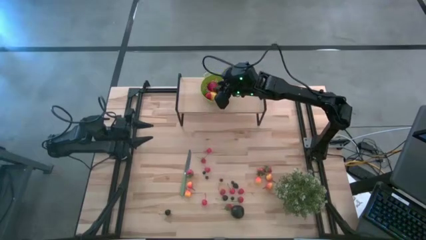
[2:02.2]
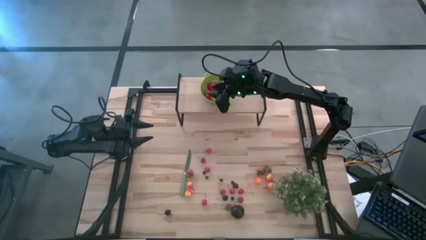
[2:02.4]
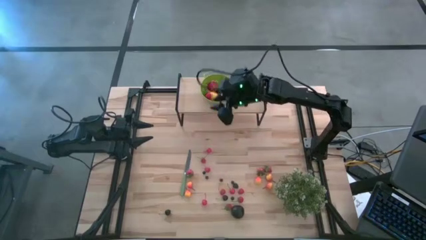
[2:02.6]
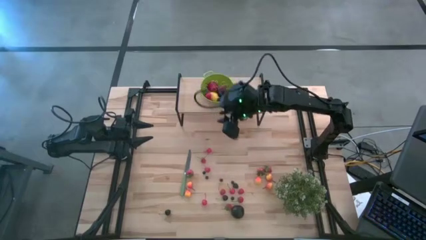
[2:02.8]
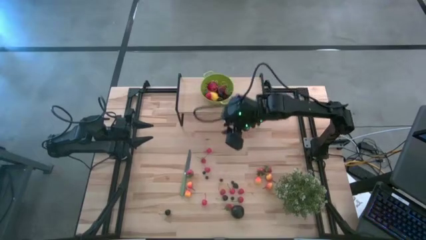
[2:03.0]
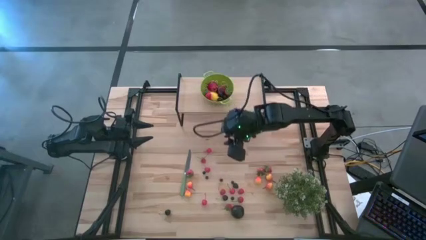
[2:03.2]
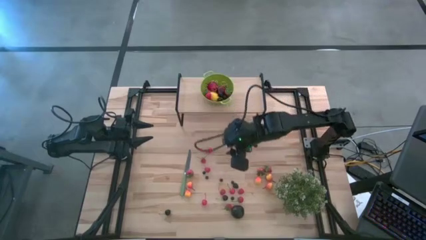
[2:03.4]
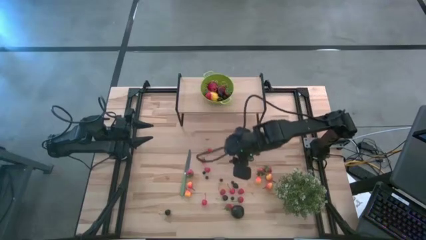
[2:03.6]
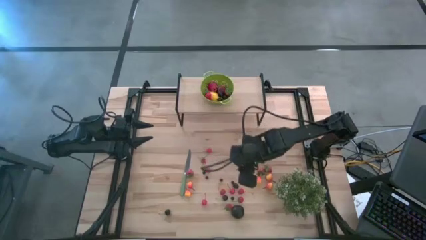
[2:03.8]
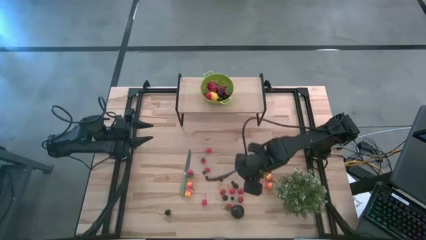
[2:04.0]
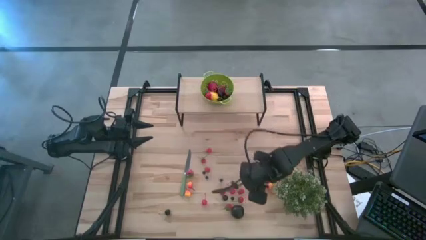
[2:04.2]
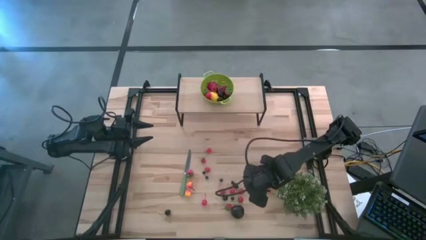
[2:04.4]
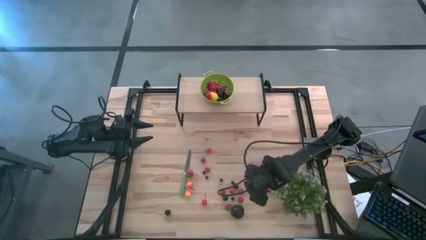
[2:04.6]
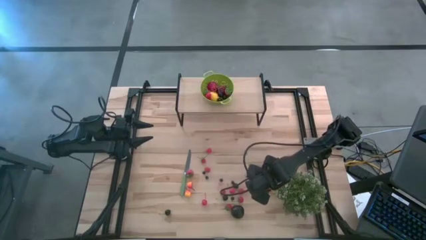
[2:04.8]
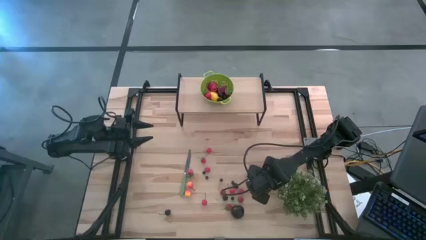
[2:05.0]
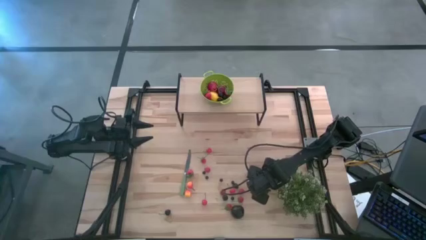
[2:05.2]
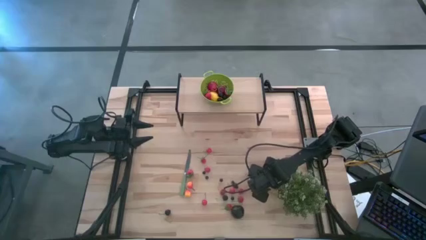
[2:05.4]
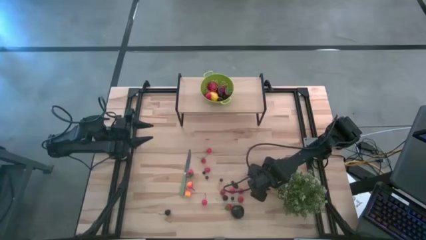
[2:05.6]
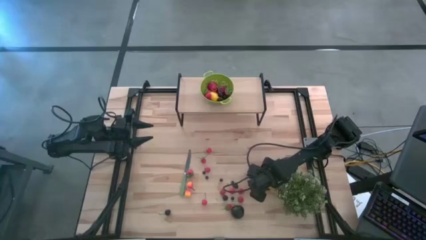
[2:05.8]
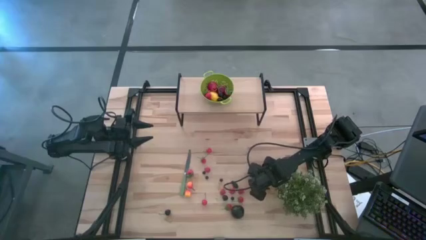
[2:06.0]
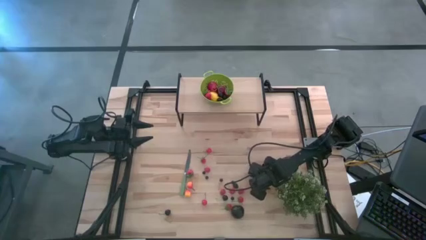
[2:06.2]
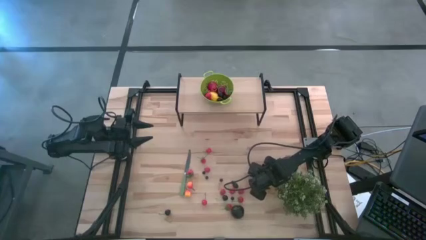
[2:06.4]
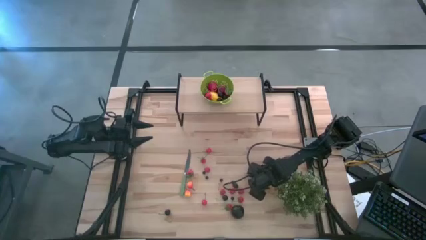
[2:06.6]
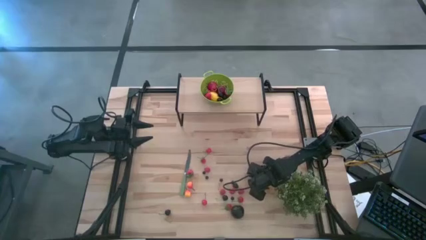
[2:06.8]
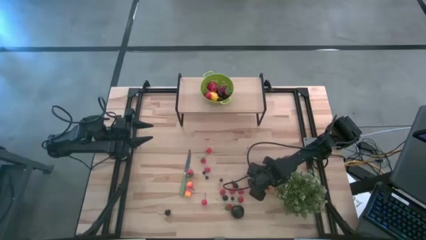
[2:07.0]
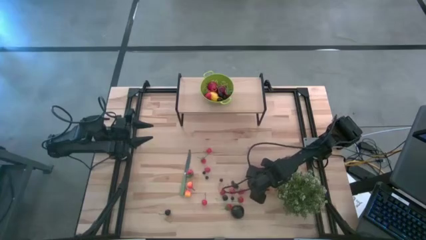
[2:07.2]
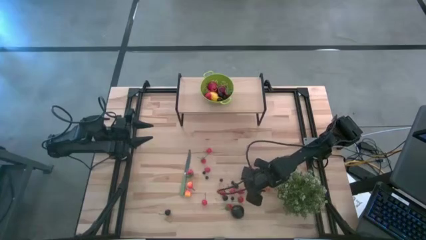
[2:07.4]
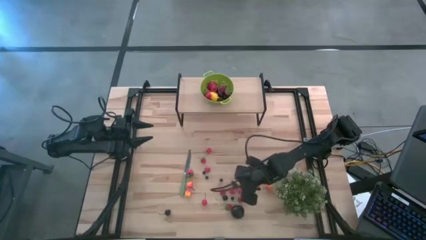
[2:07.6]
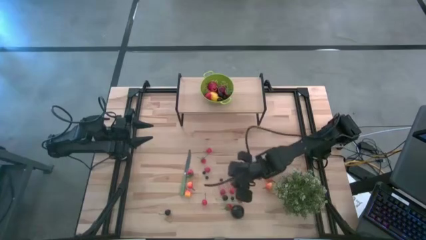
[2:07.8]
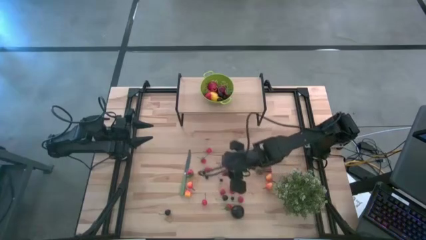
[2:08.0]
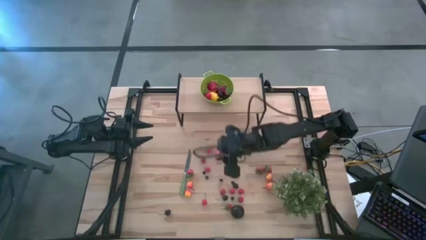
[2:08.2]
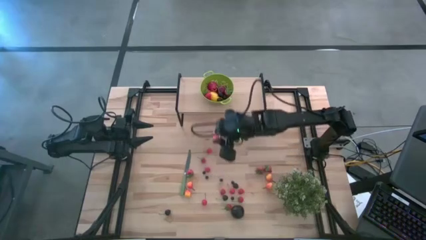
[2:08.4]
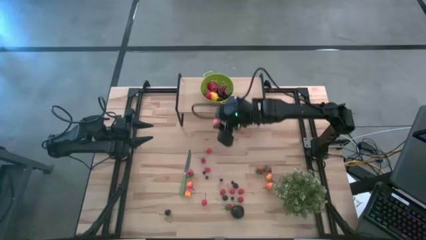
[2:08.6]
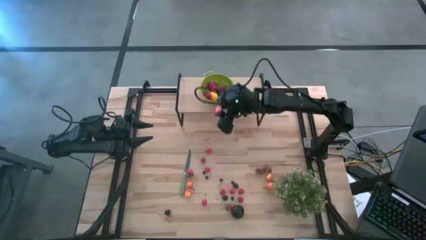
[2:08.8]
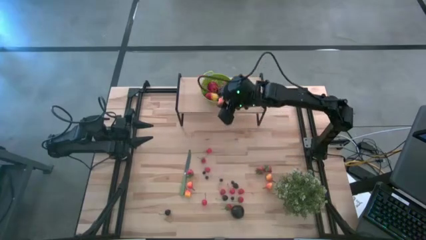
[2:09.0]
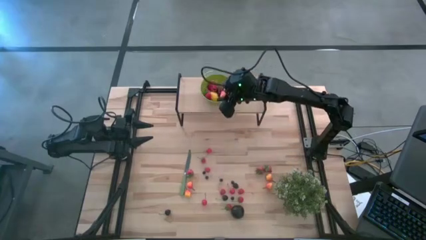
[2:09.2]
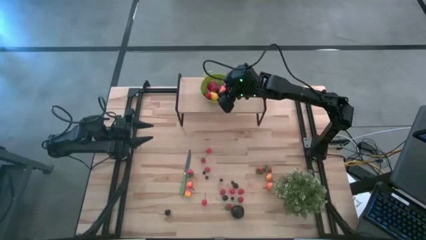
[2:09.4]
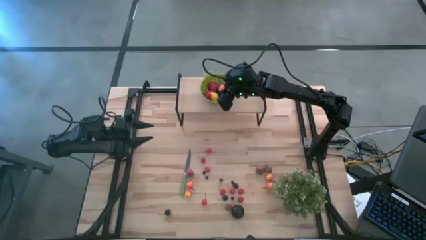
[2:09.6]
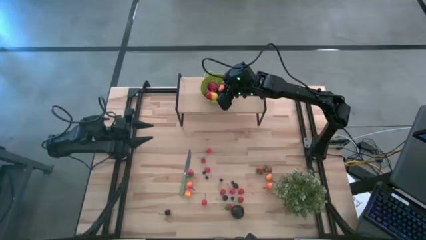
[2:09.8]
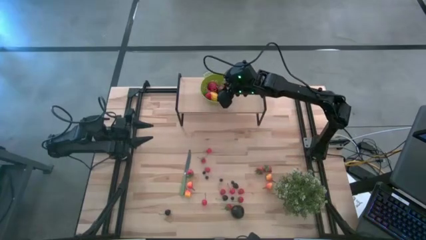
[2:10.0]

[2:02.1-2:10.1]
Task: Pick & Place Fruit
Put the pear into the green colander on the shelf

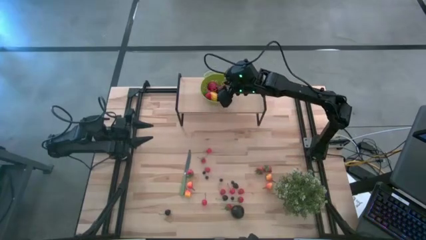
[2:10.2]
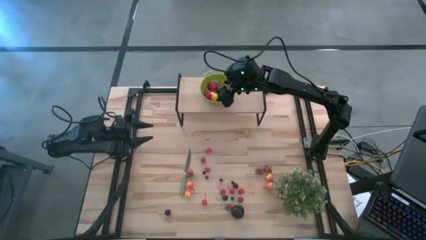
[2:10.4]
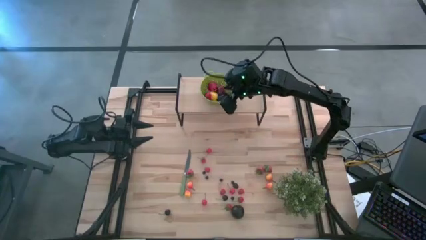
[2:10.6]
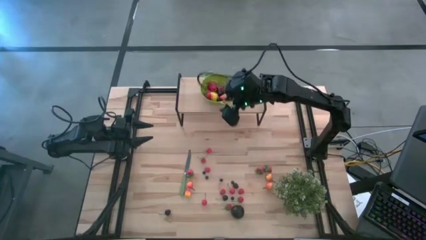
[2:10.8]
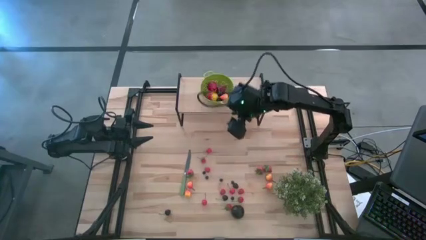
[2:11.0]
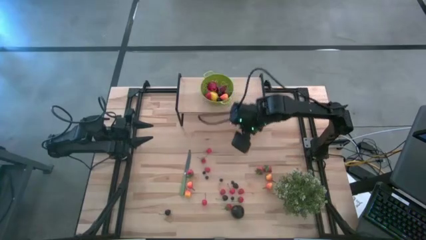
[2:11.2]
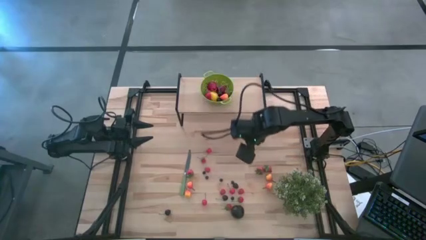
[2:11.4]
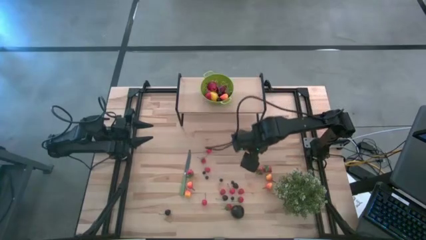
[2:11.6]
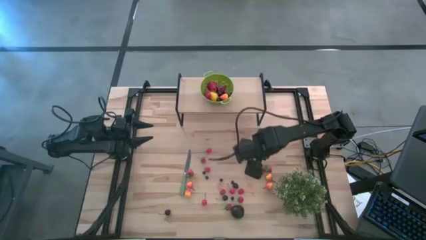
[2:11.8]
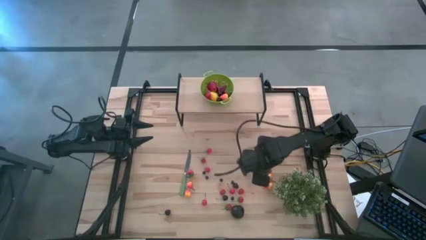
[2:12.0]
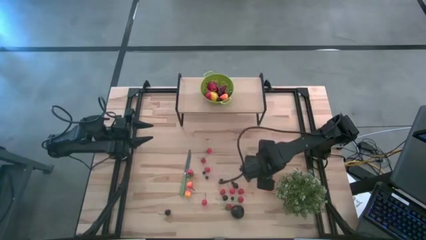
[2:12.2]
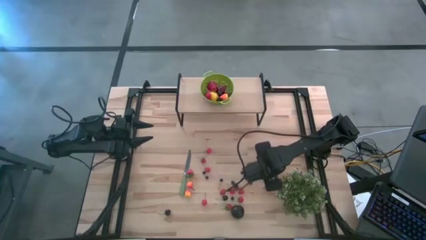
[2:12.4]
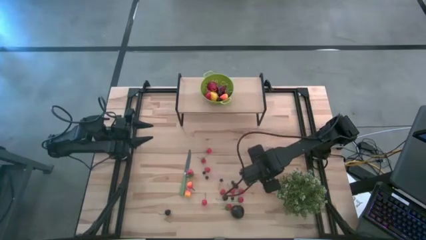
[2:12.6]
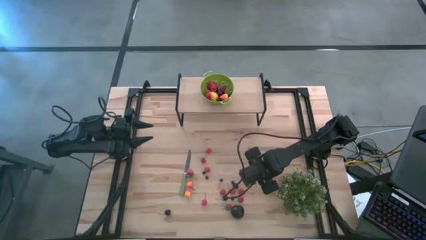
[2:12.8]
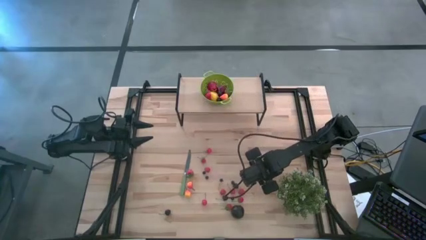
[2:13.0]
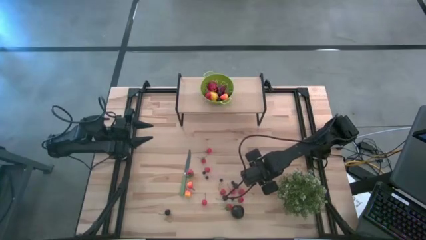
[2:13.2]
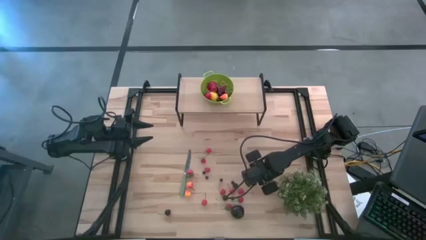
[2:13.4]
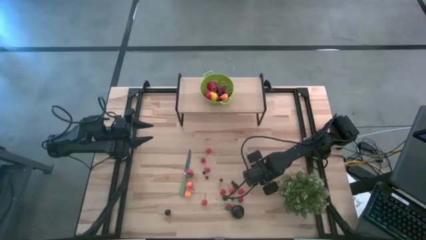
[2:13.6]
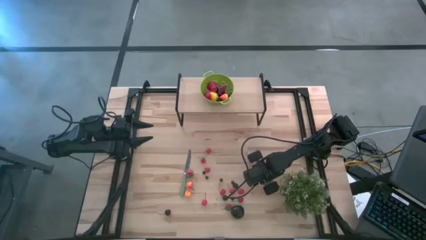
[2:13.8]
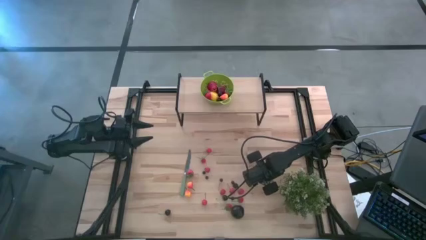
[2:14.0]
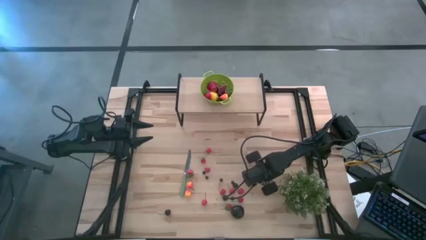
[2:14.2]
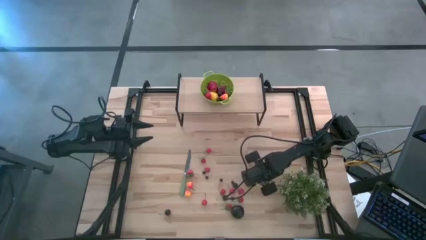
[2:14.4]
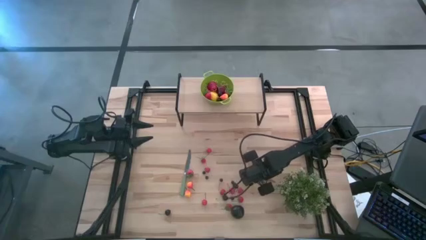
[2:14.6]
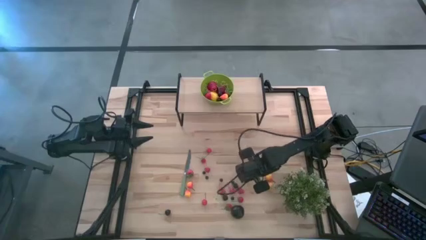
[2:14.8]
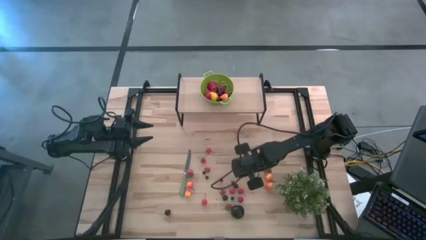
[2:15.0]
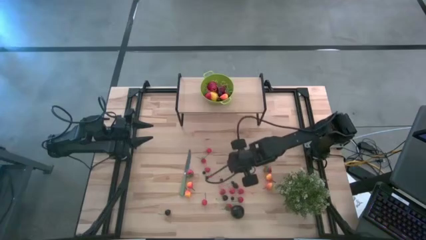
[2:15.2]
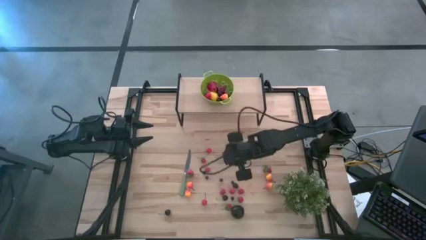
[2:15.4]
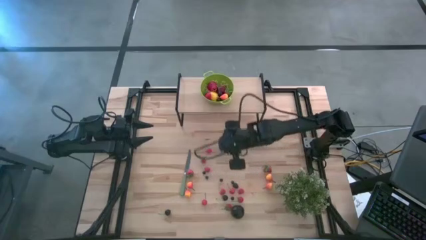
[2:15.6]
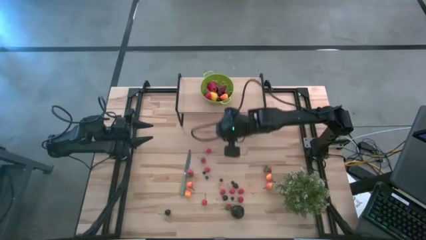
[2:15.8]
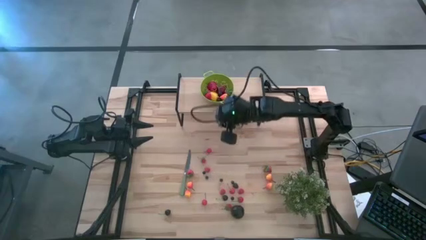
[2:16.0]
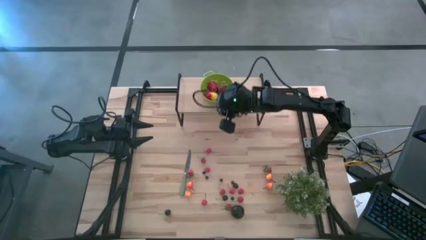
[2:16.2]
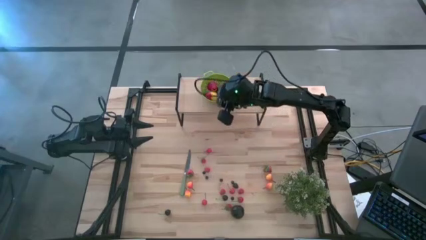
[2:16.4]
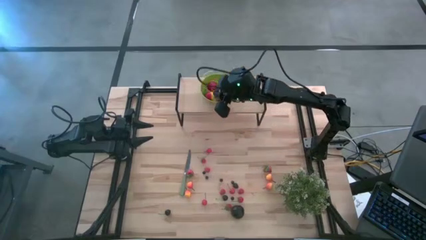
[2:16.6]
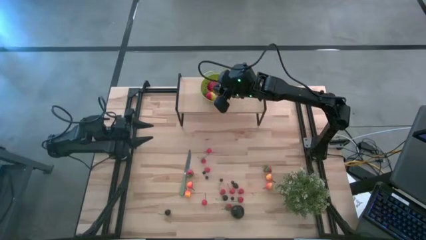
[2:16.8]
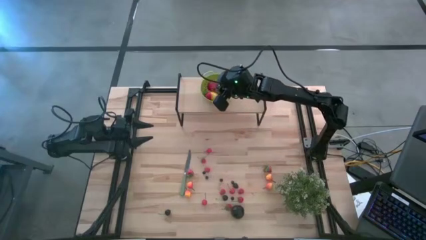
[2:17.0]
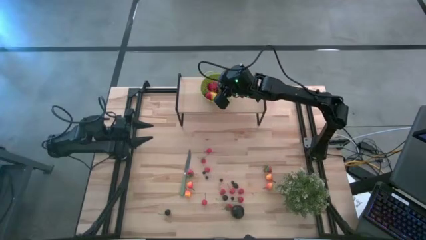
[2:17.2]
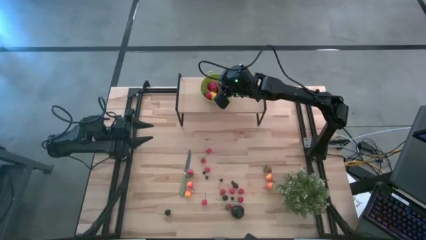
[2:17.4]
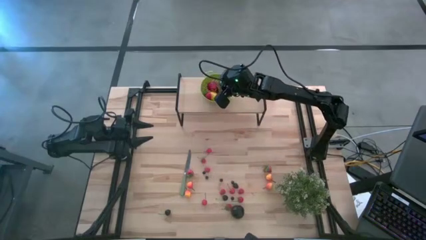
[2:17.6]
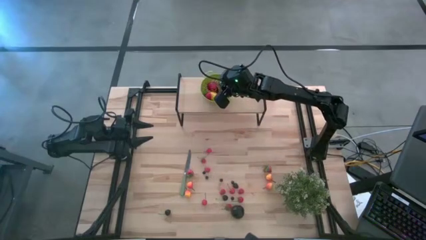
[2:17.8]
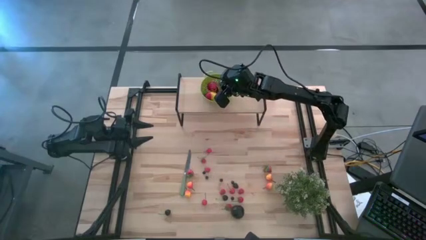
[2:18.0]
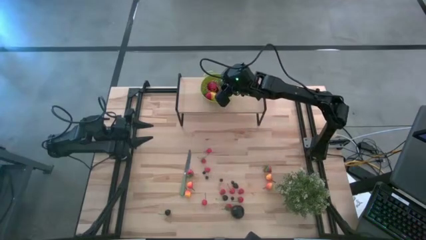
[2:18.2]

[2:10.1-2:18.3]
Put the strawberry into the green colander on the shelf
